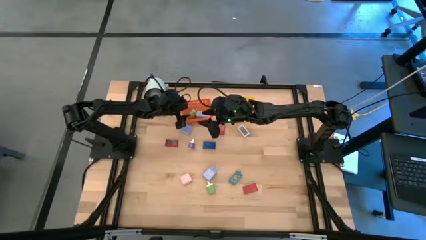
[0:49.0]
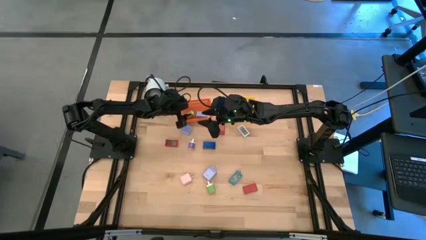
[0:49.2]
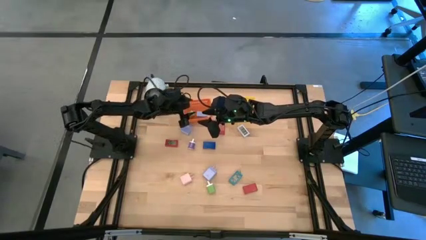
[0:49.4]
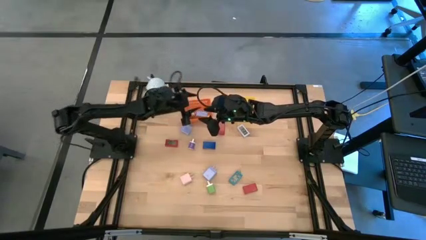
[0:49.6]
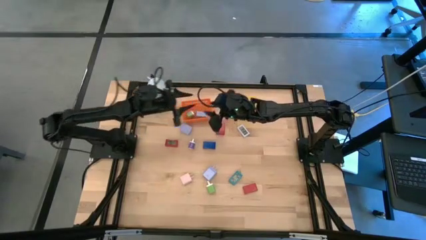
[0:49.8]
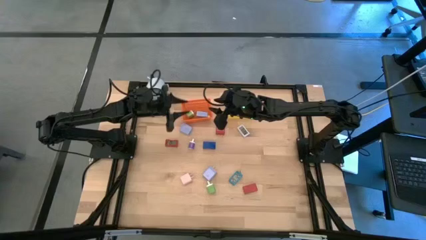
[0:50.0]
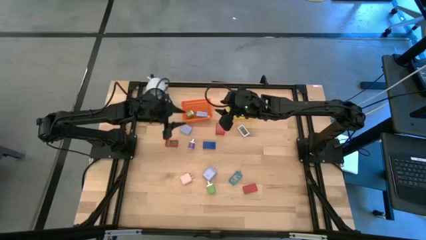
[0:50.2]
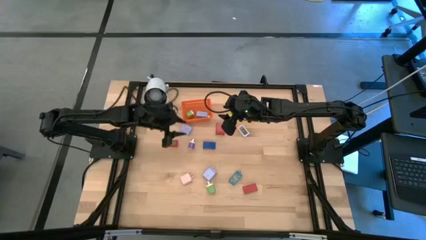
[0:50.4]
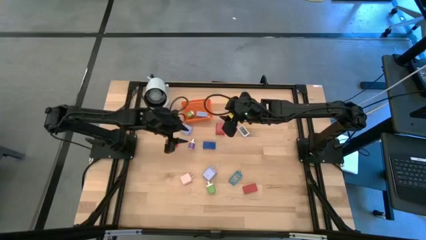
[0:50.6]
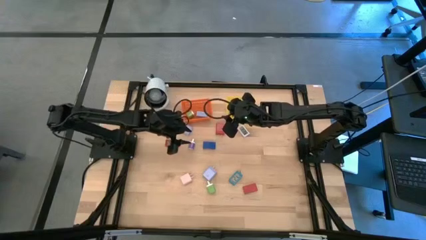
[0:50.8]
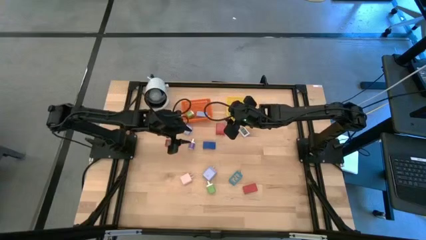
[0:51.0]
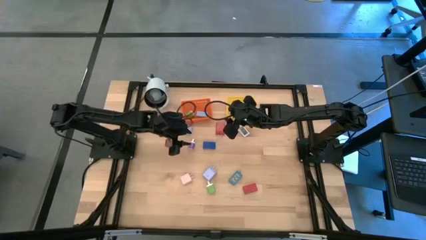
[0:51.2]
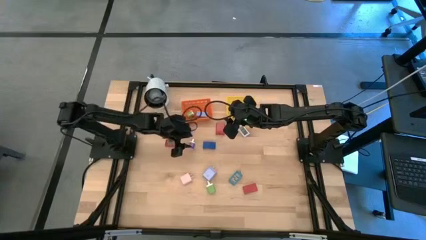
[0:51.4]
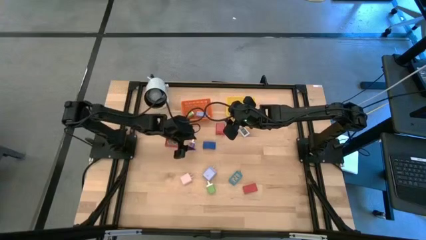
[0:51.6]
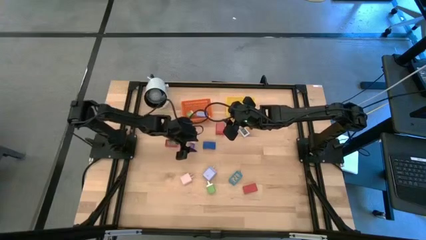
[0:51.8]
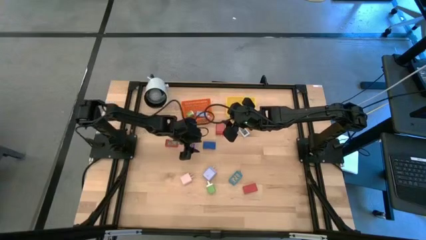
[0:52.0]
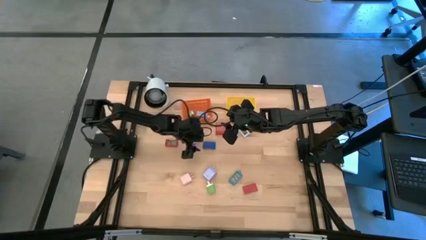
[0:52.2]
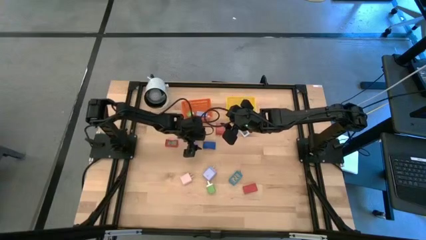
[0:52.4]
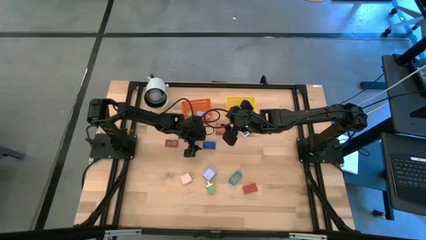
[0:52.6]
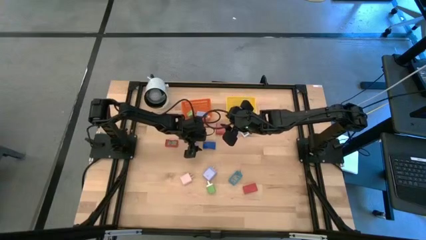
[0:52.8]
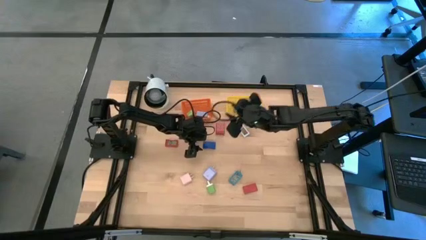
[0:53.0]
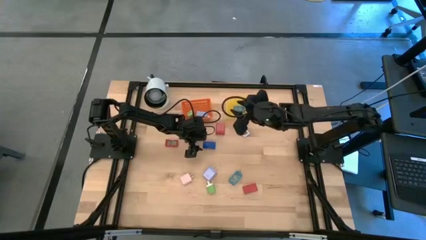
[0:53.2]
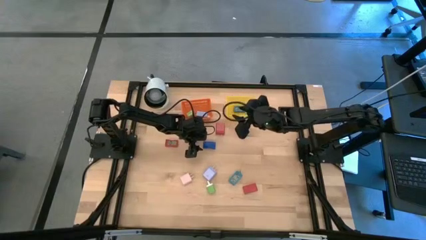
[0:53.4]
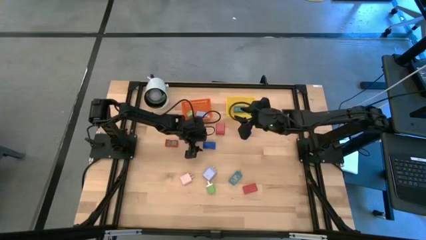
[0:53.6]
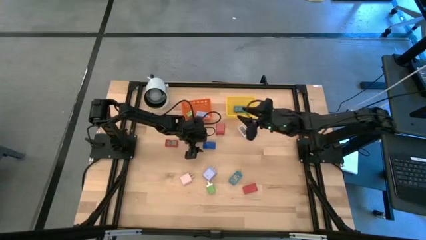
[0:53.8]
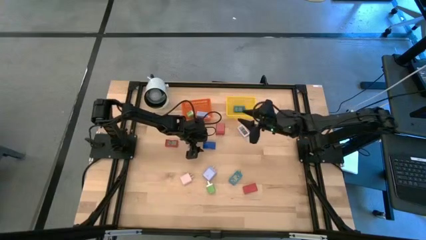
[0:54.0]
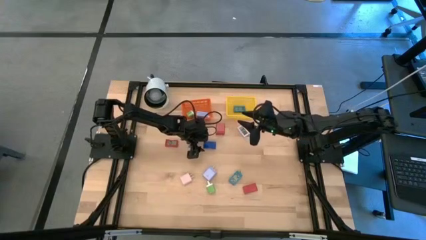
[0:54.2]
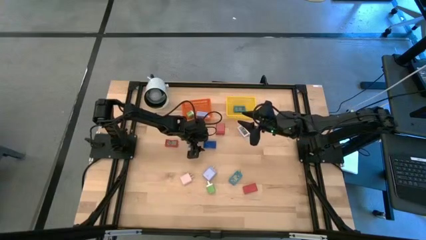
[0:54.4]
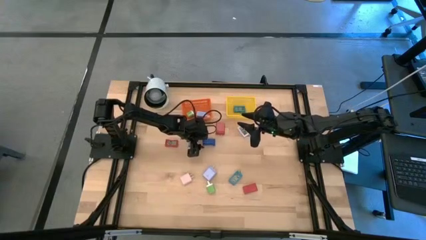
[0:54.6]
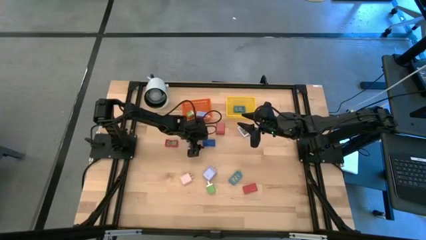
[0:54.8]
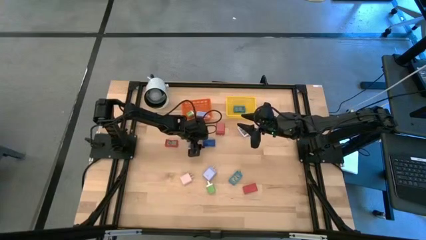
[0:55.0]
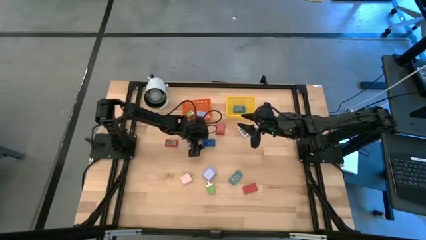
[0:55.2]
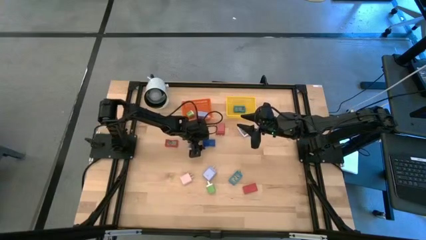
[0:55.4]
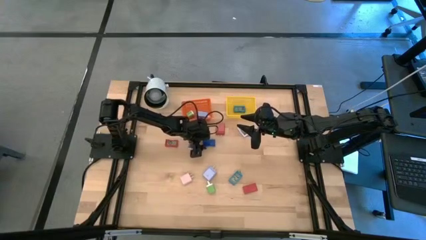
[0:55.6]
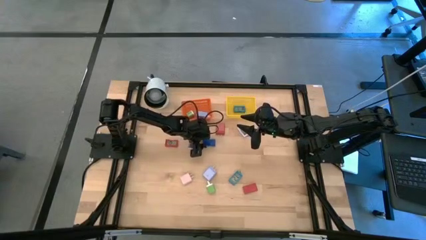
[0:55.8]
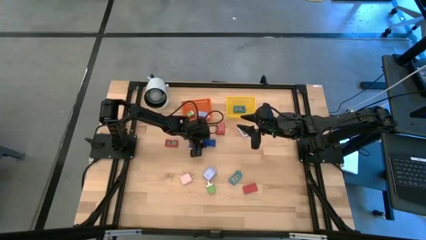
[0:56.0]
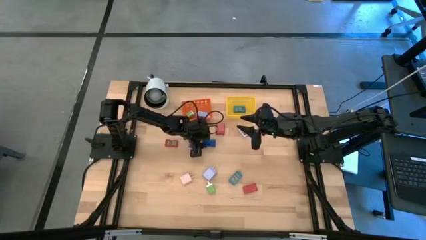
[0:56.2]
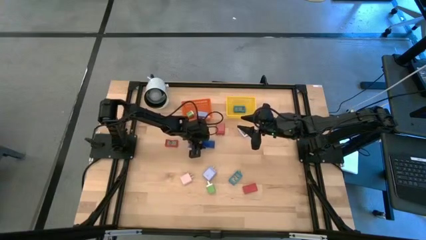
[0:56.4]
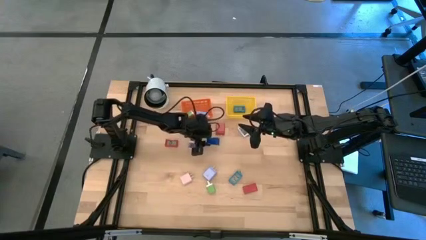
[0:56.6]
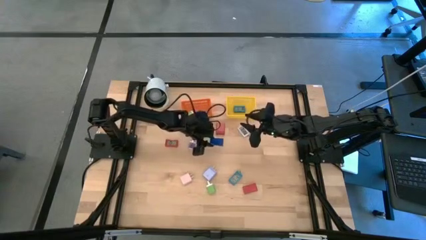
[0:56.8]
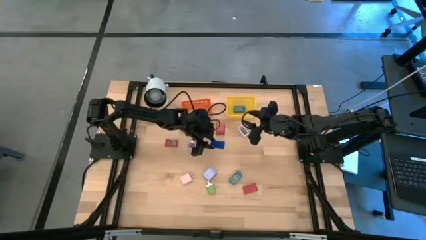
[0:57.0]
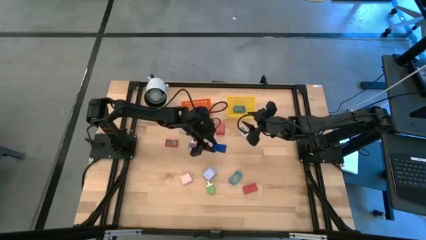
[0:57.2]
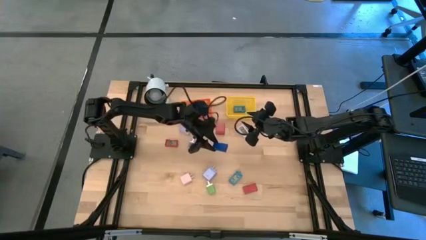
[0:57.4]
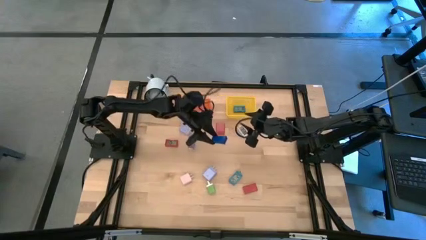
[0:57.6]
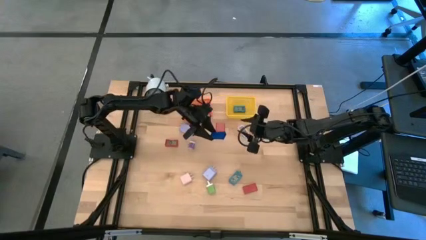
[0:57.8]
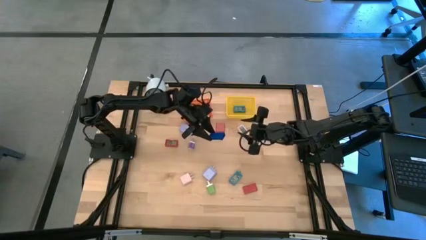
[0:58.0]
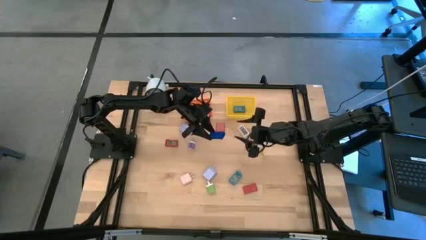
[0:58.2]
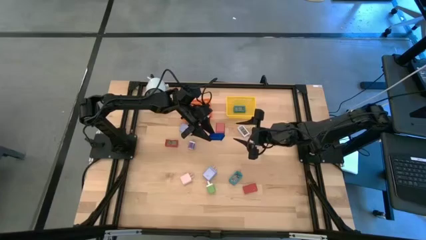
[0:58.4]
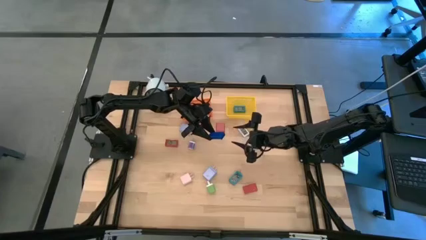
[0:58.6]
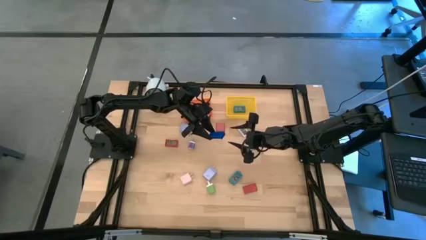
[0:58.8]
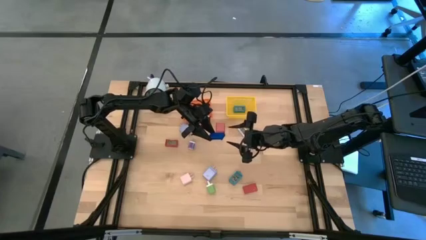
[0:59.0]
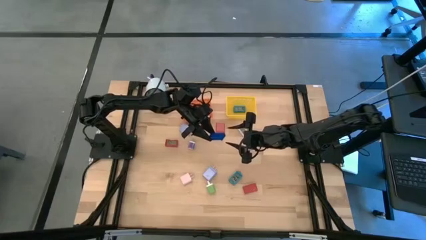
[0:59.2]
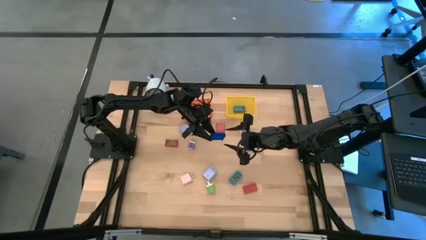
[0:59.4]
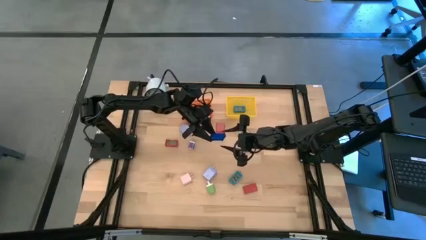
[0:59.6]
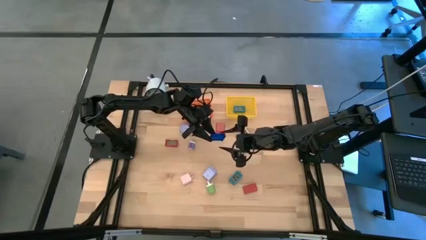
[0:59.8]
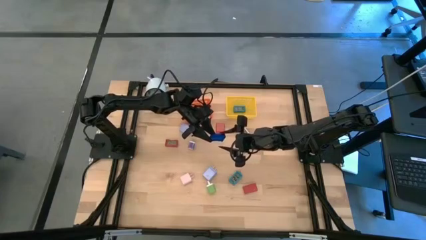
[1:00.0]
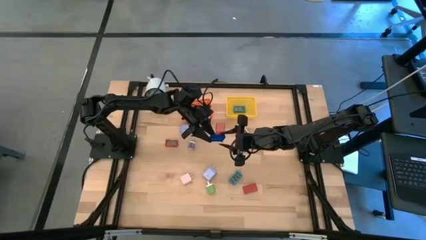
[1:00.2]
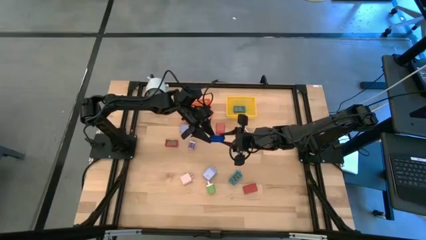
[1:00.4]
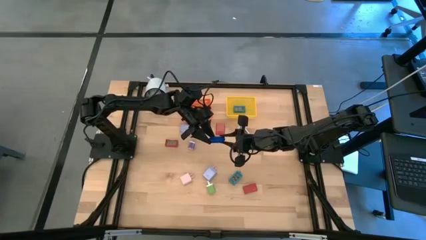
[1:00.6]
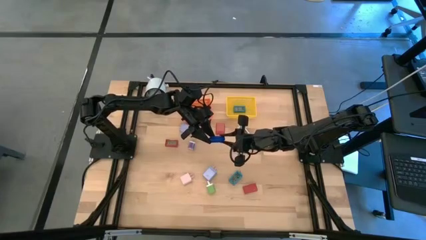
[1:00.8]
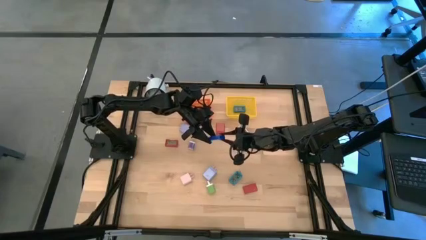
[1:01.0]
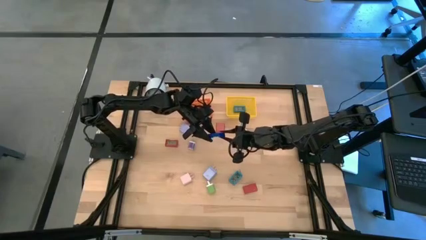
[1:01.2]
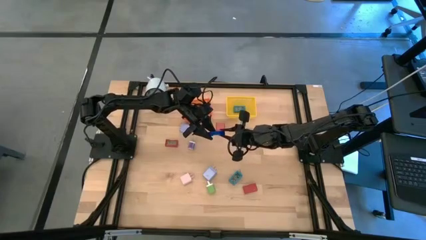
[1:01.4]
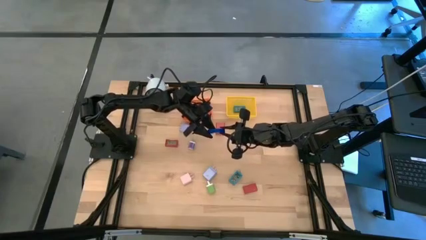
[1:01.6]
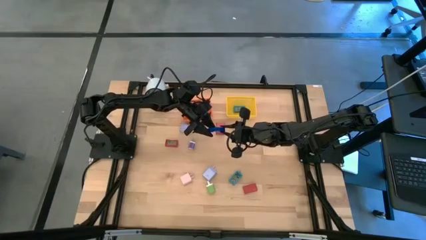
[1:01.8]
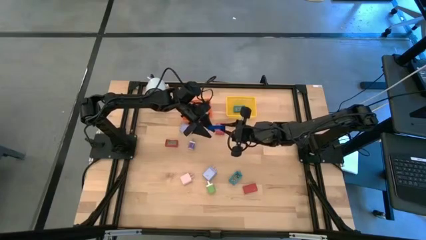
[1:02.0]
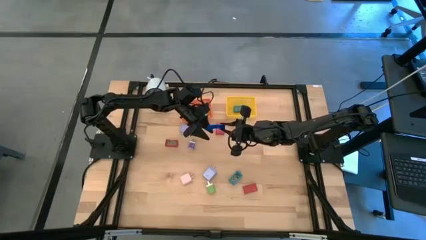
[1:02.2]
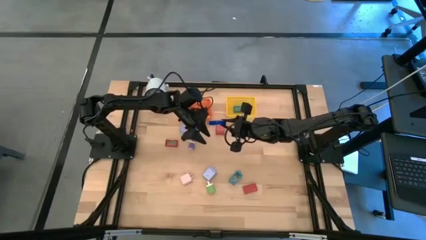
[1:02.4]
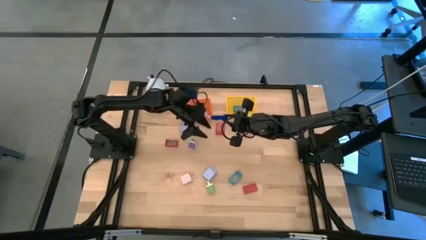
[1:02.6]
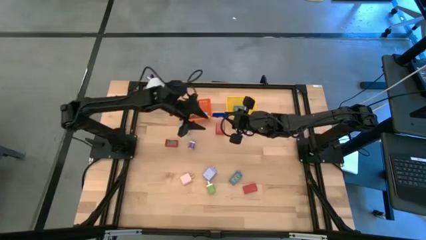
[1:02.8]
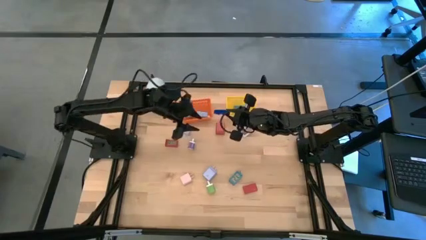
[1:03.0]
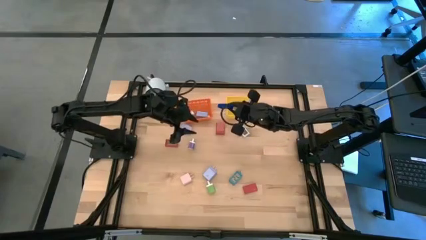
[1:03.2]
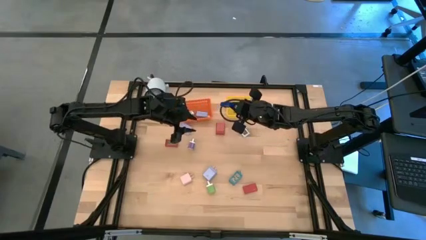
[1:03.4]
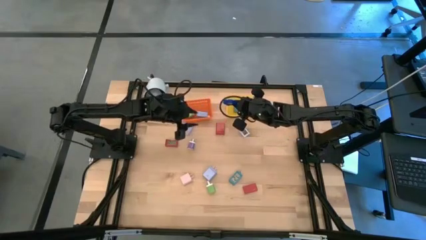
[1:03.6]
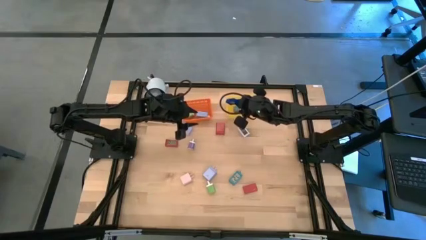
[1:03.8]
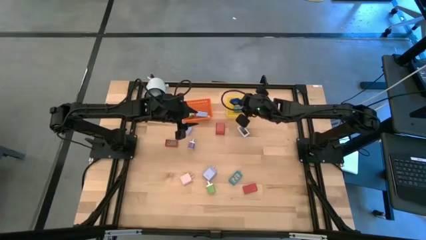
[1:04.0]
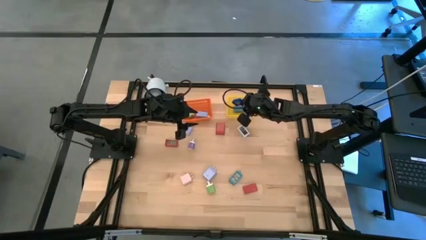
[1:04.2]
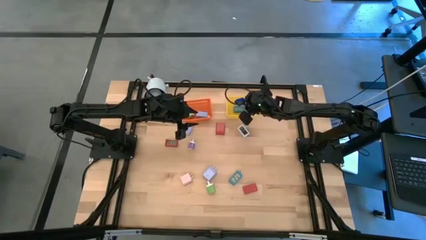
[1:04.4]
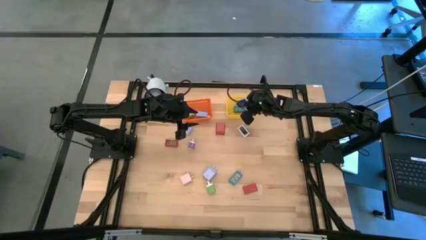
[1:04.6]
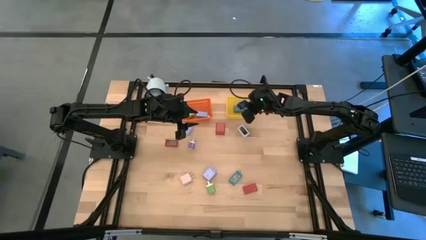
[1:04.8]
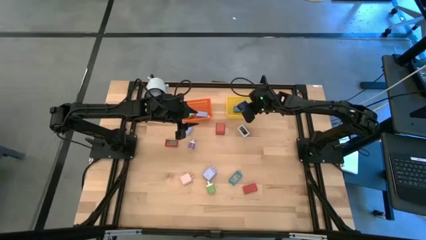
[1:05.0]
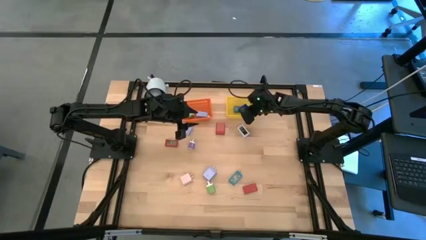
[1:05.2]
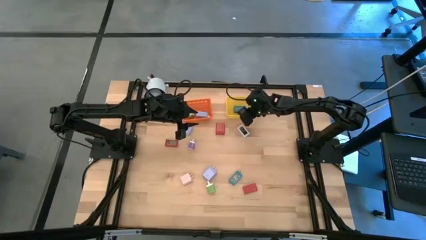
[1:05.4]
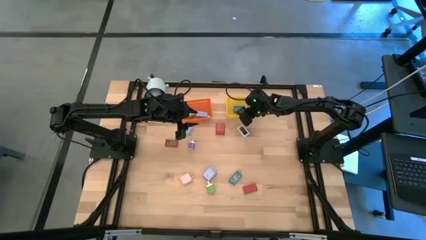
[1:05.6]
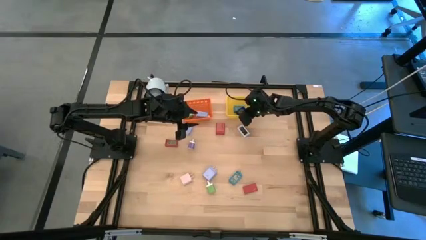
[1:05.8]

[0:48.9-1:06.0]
Task: Pick & Place Office items
Put the dark blue digital clock into the yellow bin

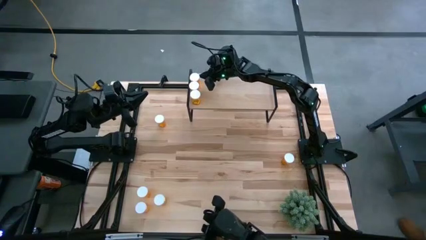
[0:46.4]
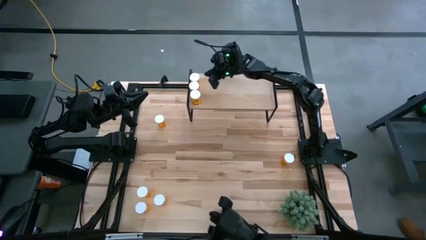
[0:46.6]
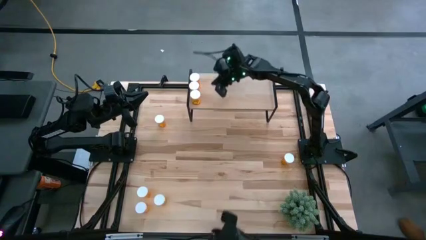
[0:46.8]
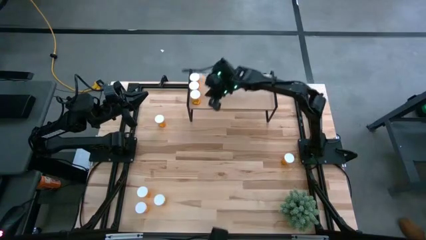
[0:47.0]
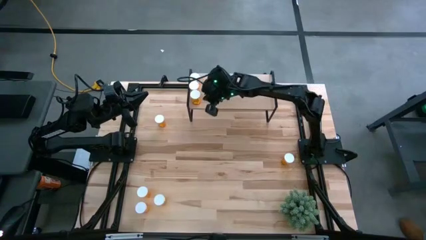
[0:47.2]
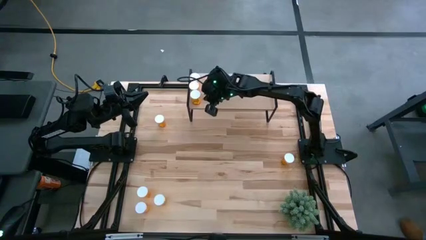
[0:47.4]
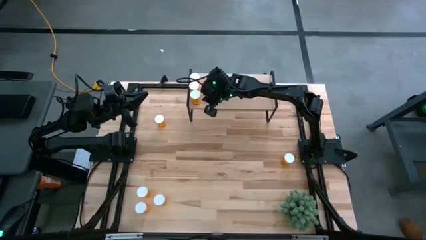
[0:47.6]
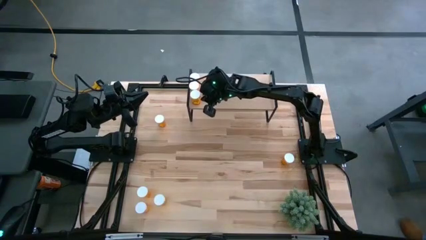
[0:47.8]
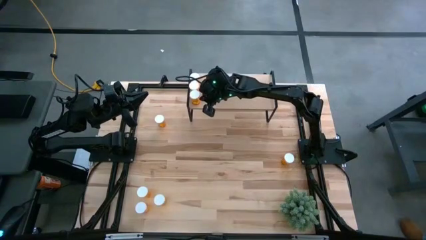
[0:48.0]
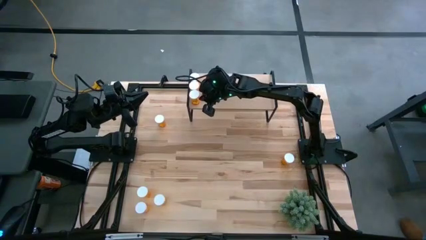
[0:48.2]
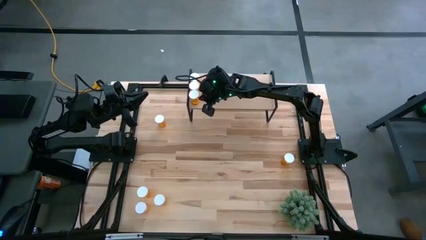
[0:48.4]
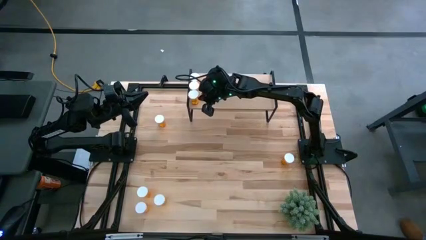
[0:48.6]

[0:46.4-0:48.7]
Task: Pick and place medicine bottles onto shelf by color
Adjust the orange pill bottle on the shelf
